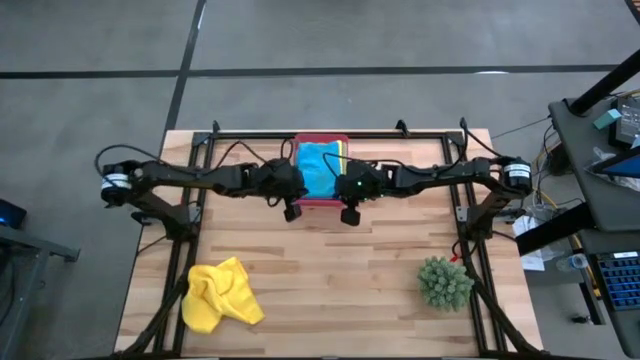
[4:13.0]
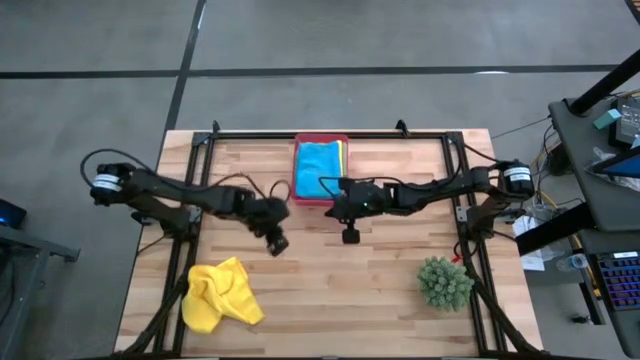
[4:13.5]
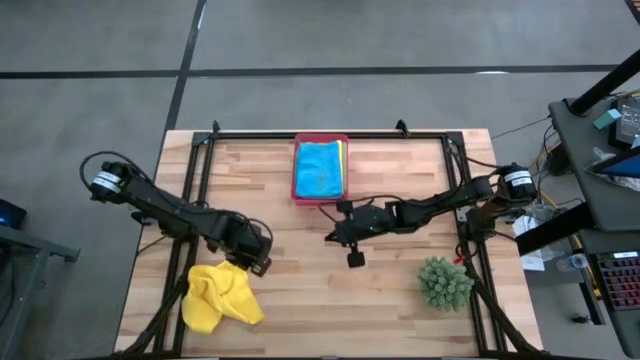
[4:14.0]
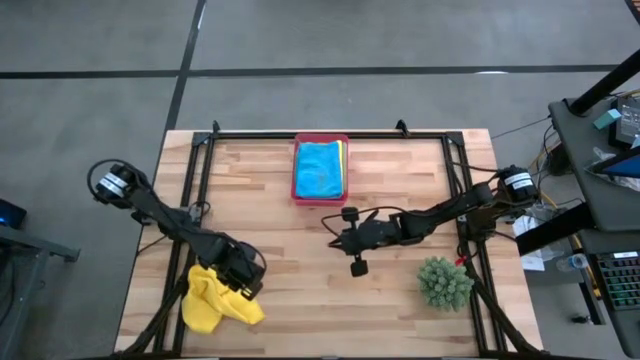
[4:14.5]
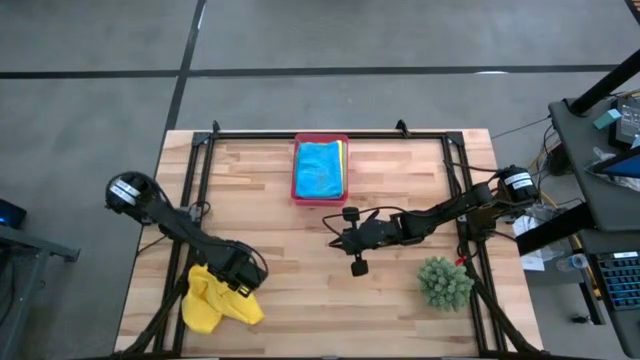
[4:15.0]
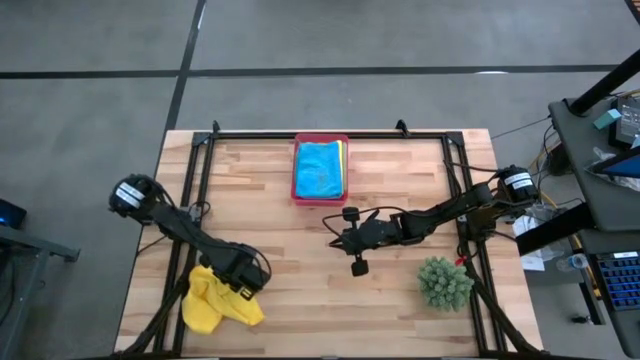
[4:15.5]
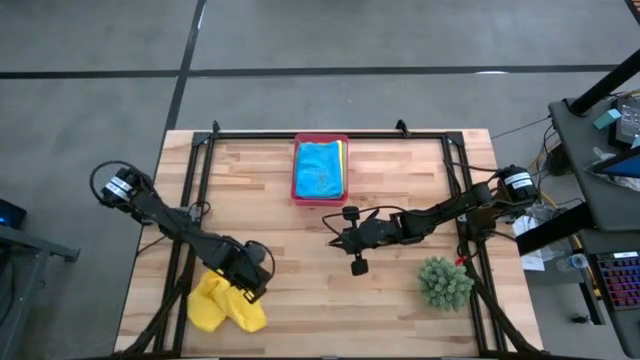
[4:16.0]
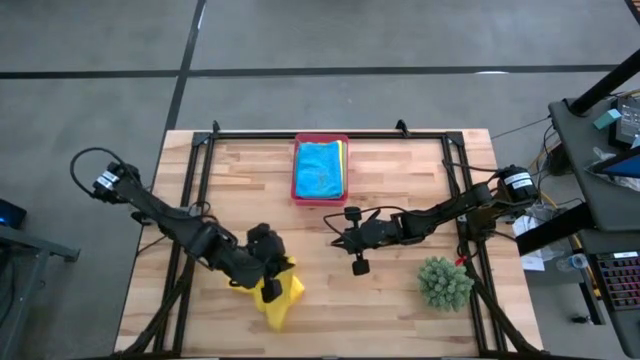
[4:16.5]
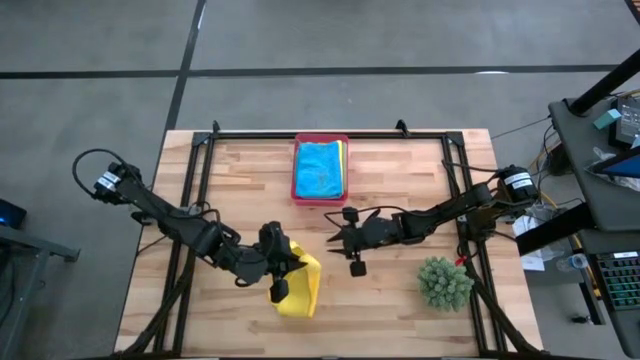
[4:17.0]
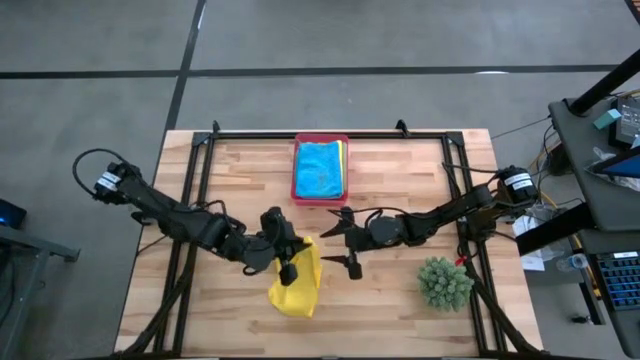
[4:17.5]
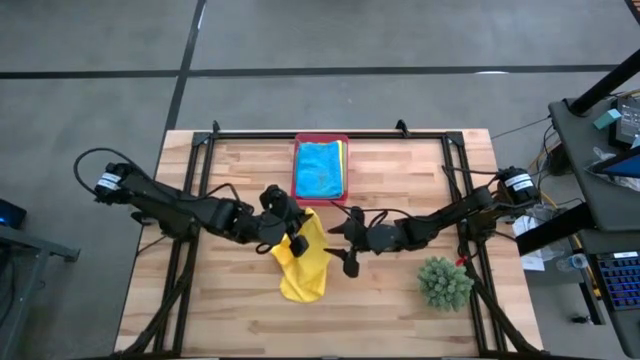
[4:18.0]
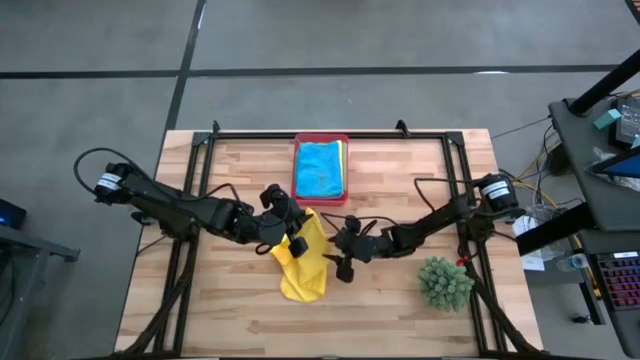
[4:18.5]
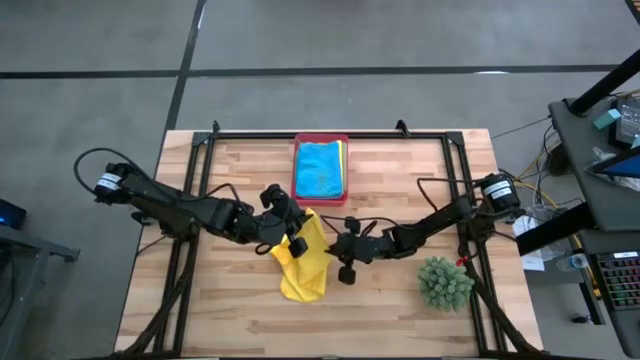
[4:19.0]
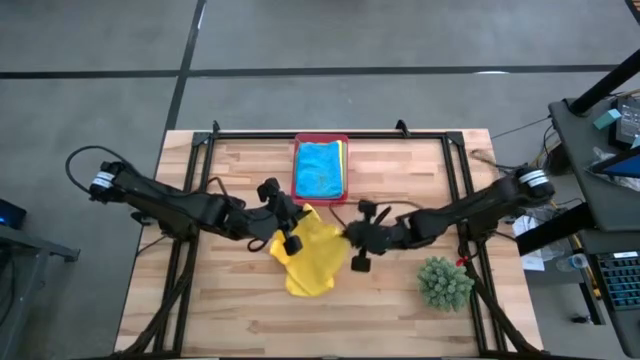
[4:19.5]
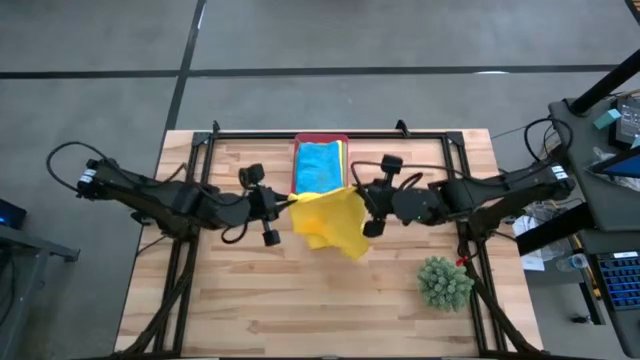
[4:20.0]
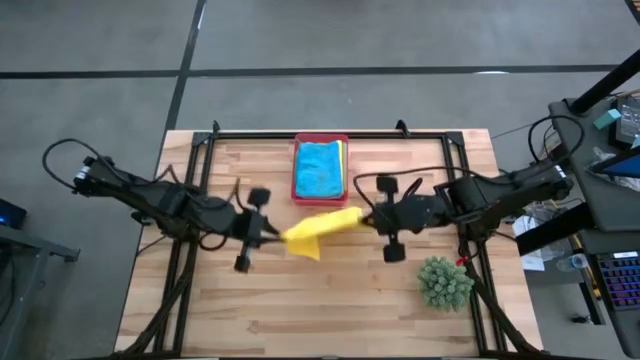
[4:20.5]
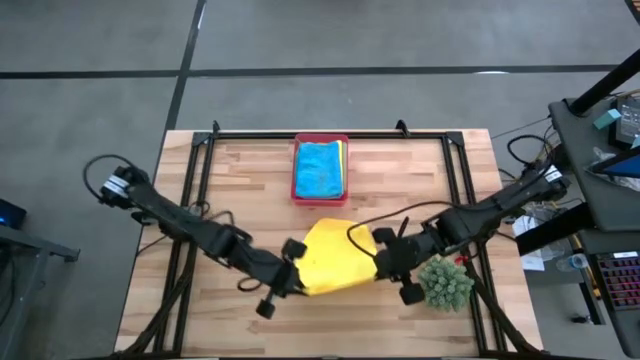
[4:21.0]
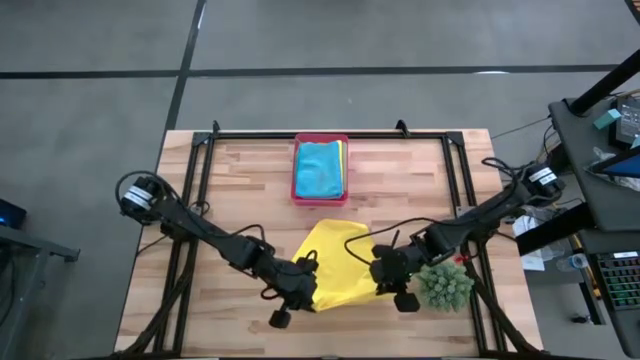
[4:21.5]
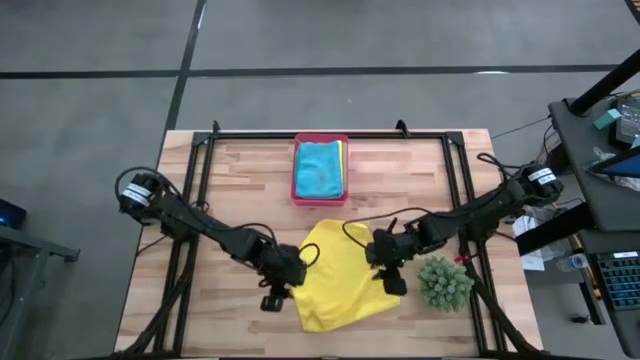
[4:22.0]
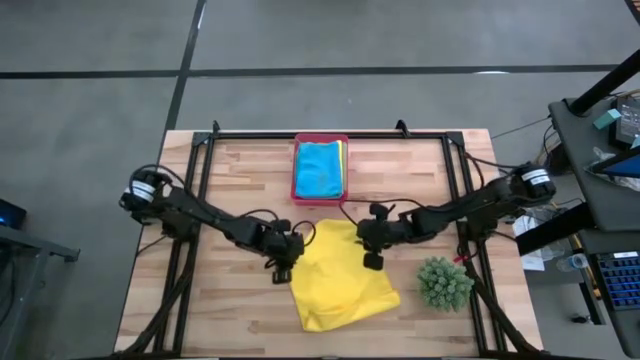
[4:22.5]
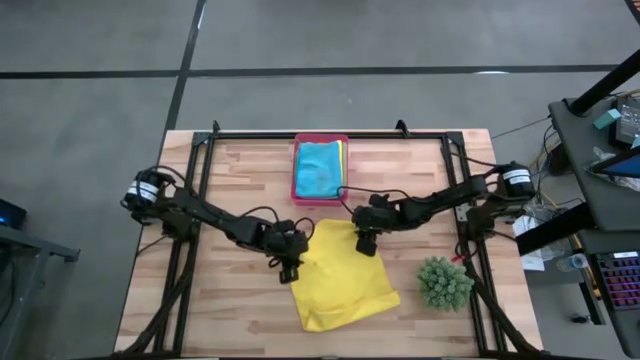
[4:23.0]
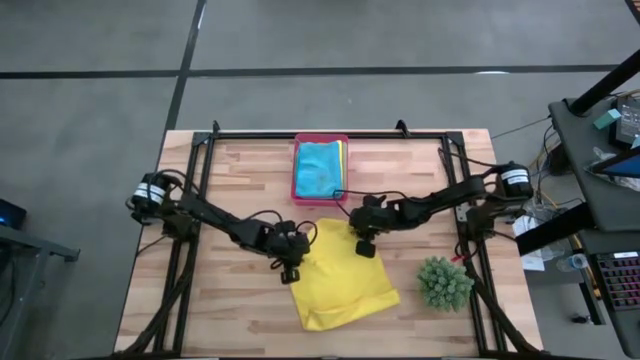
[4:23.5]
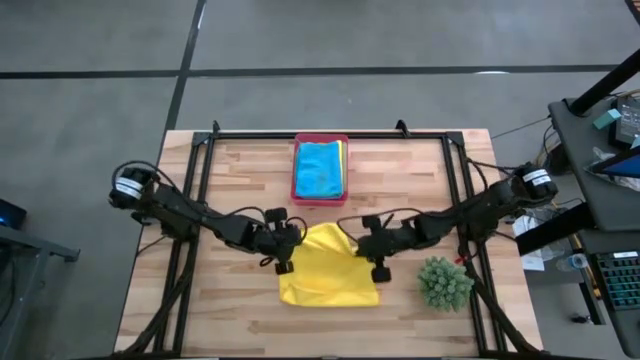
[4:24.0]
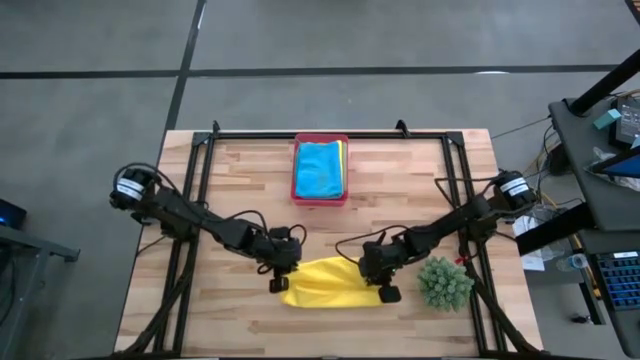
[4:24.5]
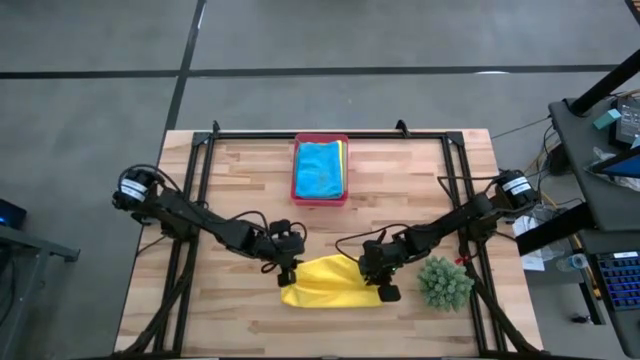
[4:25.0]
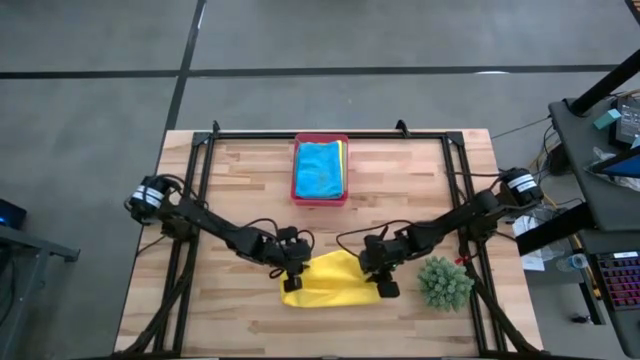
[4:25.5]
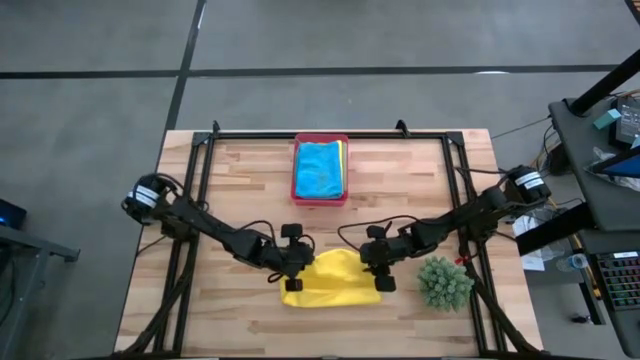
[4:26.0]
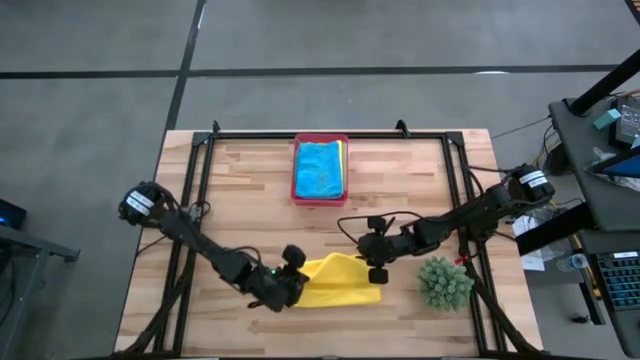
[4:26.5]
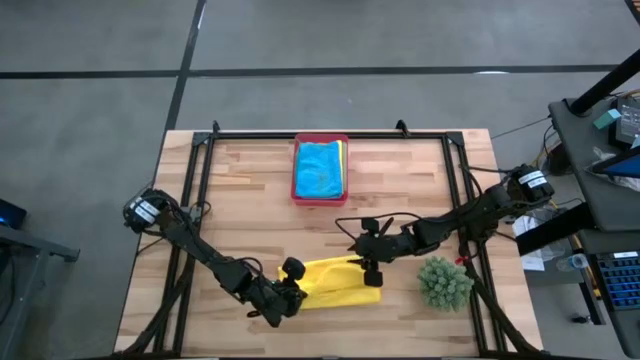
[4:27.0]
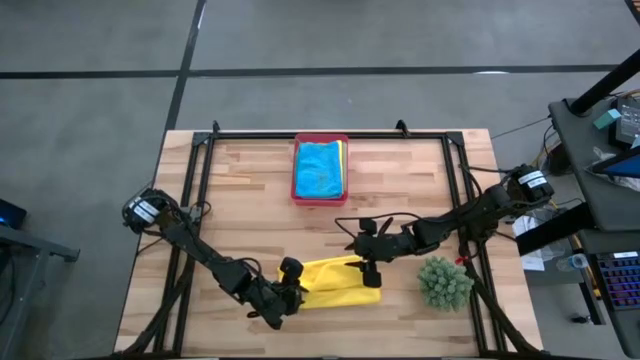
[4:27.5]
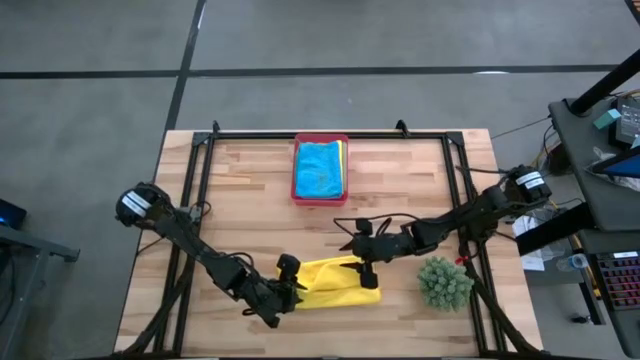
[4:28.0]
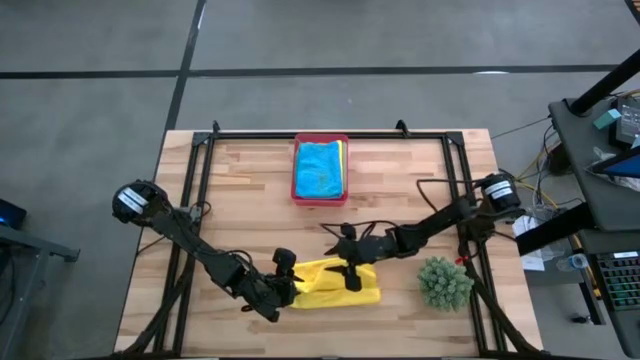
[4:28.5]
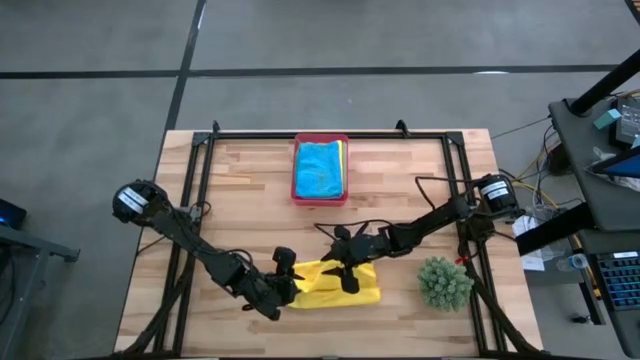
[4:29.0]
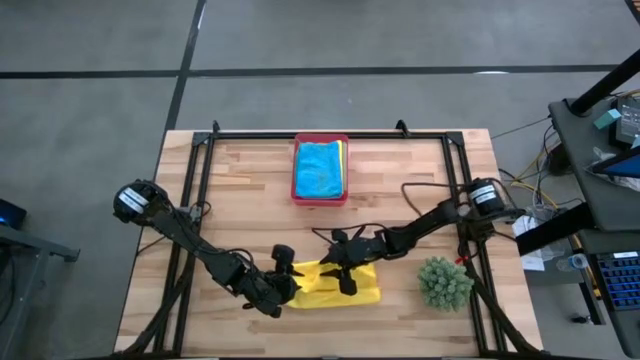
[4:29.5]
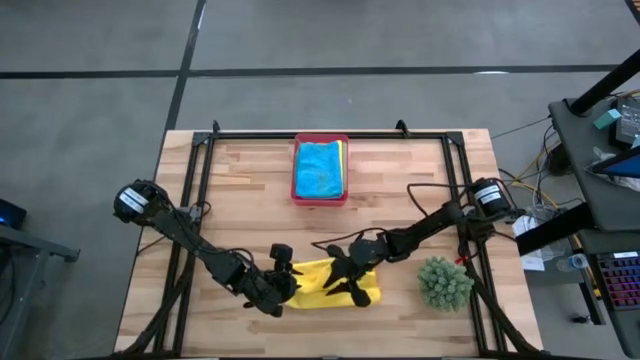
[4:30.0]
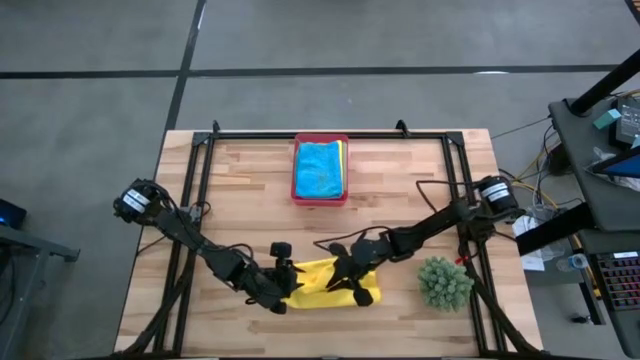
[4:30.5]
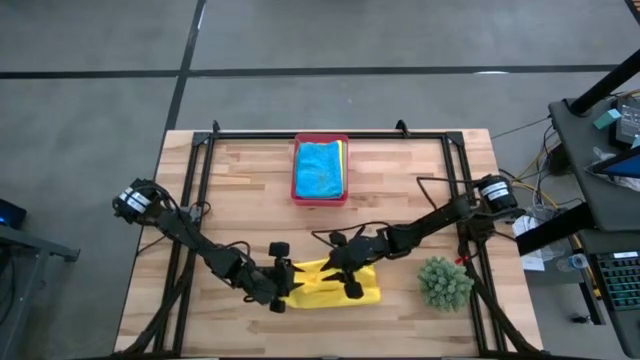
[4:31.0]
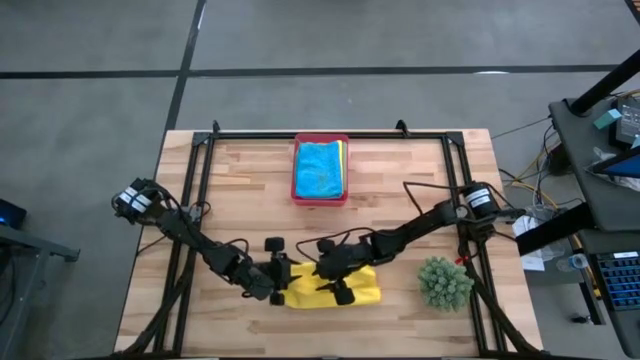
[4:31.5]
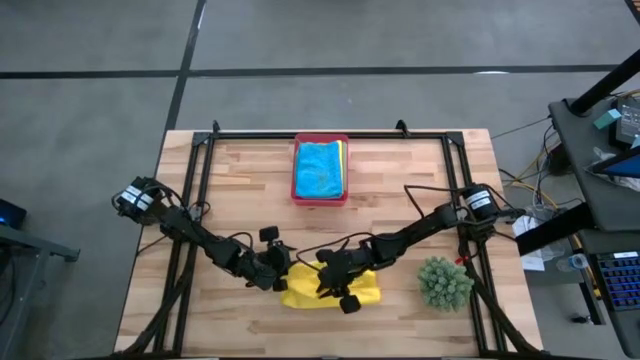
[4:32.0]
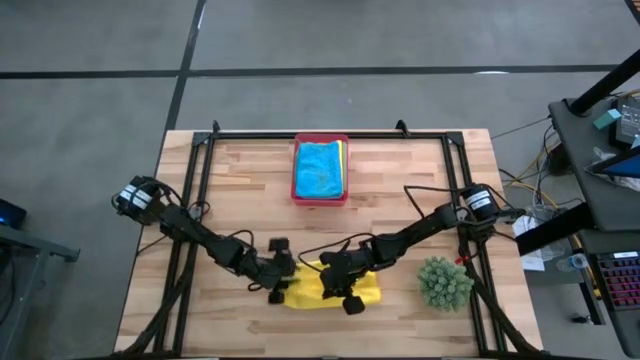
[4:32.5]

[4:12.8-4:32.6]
Task: Fold microfiber towels
Fold the yellow towel
